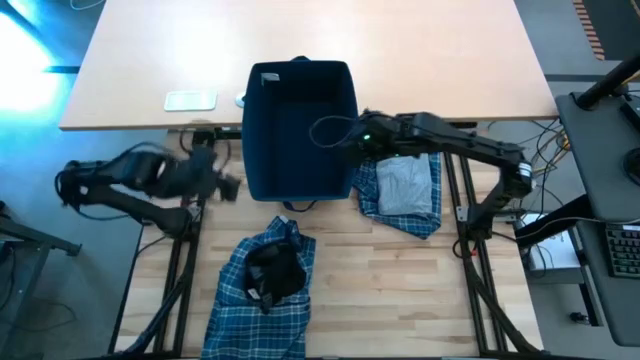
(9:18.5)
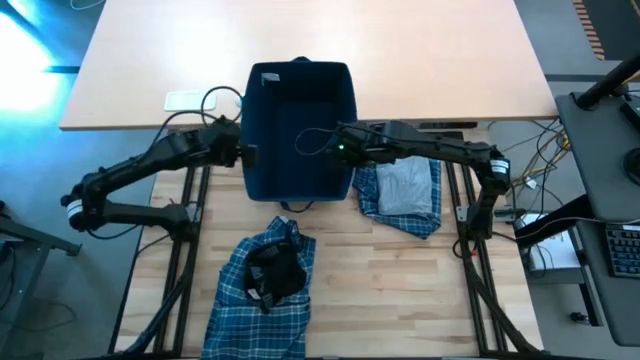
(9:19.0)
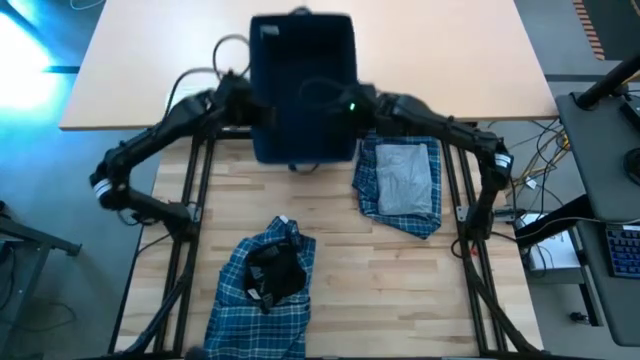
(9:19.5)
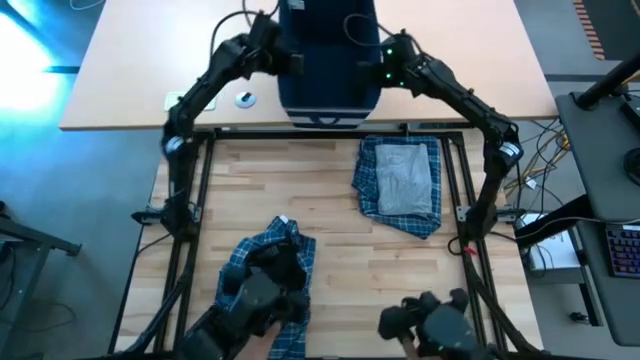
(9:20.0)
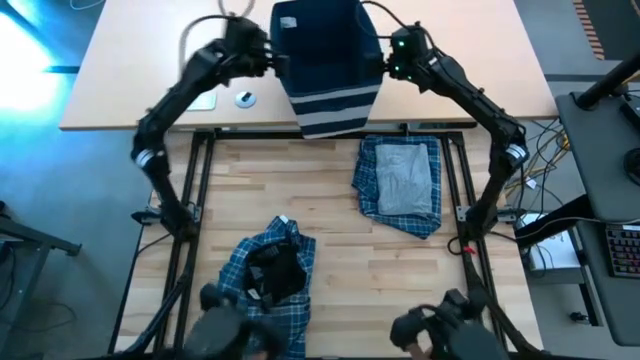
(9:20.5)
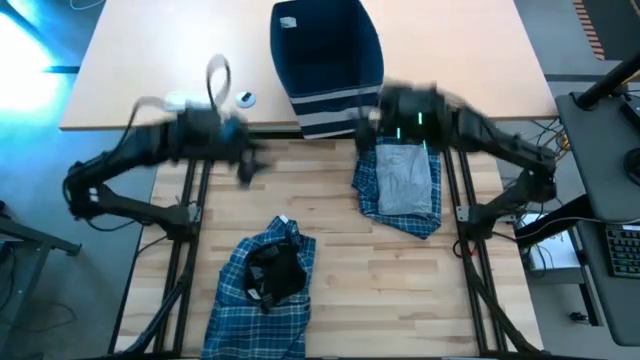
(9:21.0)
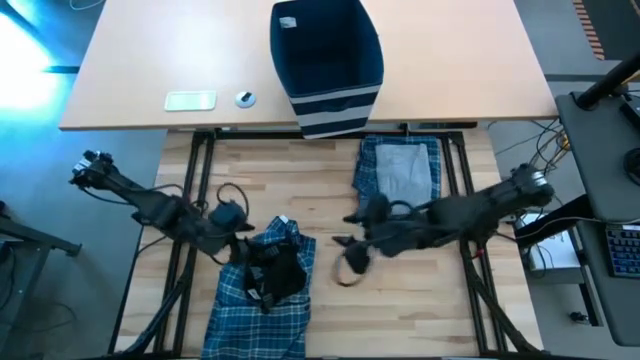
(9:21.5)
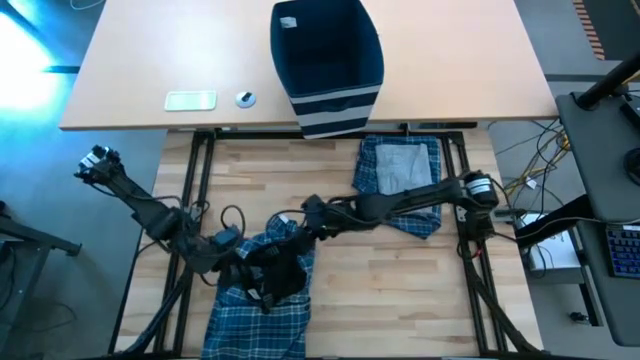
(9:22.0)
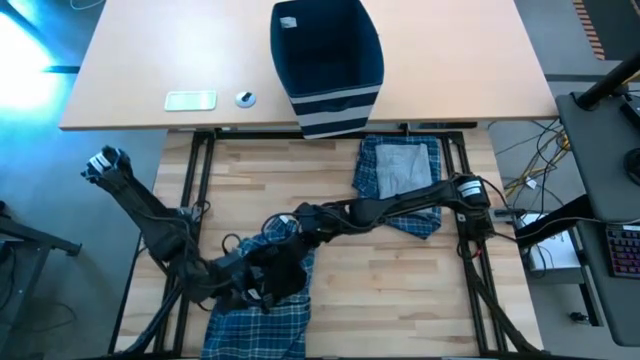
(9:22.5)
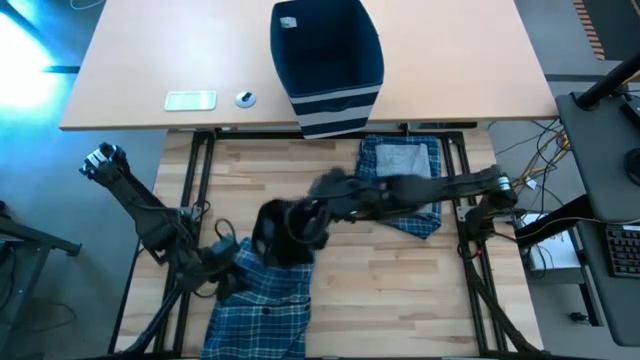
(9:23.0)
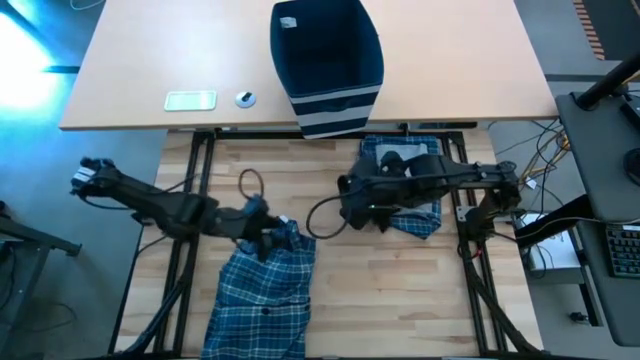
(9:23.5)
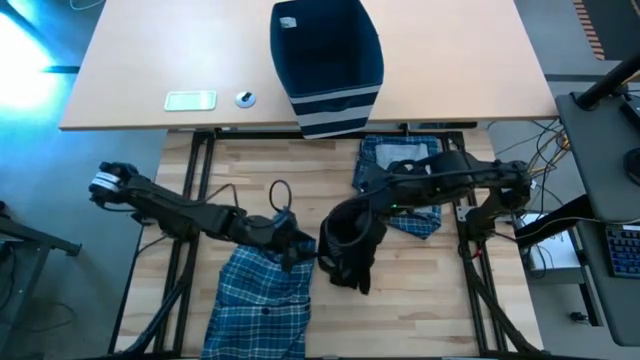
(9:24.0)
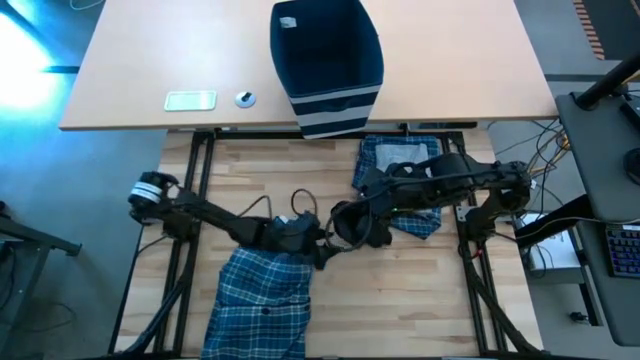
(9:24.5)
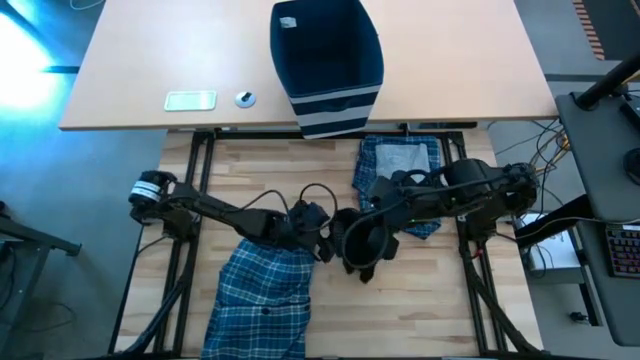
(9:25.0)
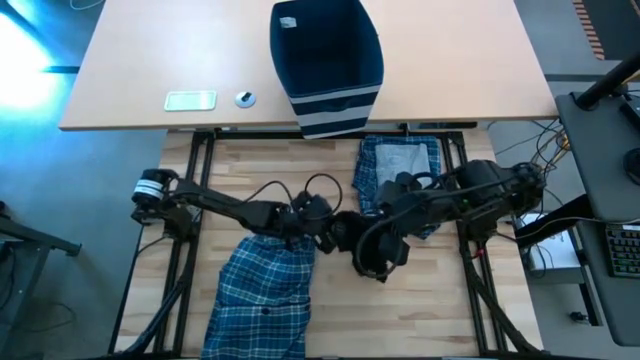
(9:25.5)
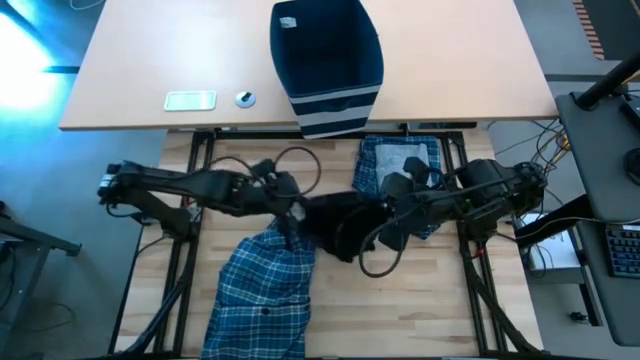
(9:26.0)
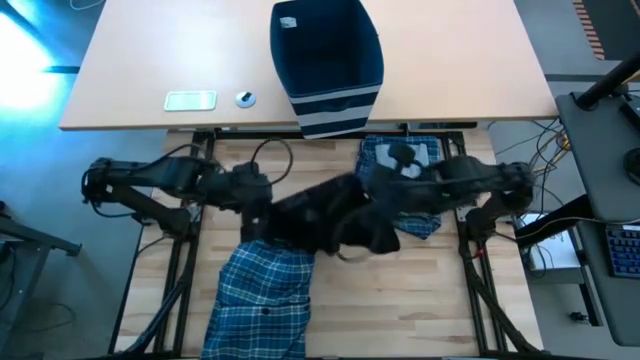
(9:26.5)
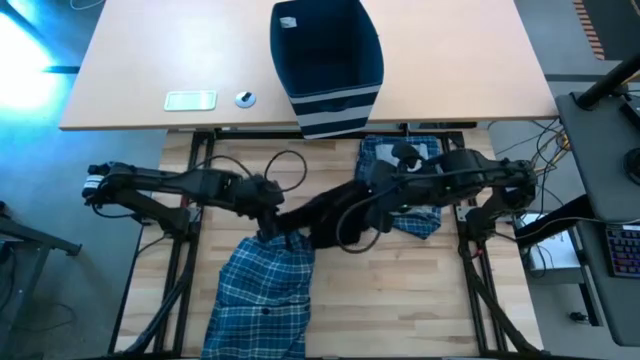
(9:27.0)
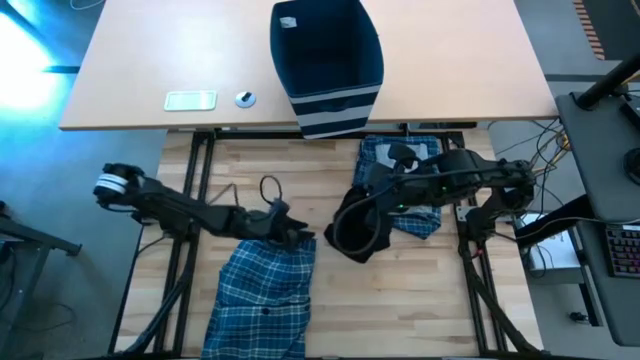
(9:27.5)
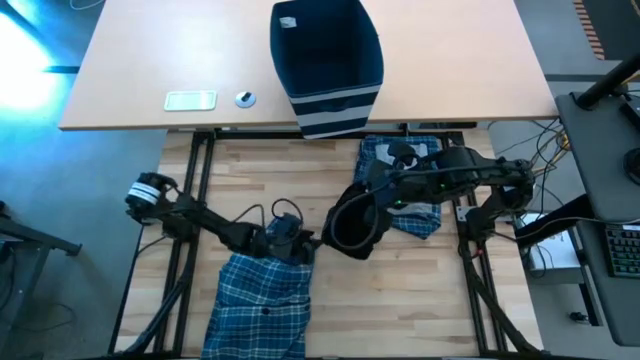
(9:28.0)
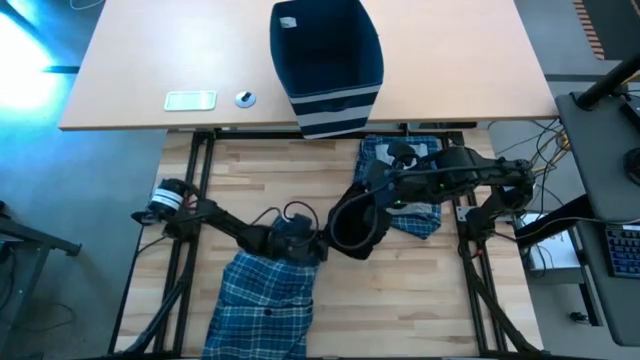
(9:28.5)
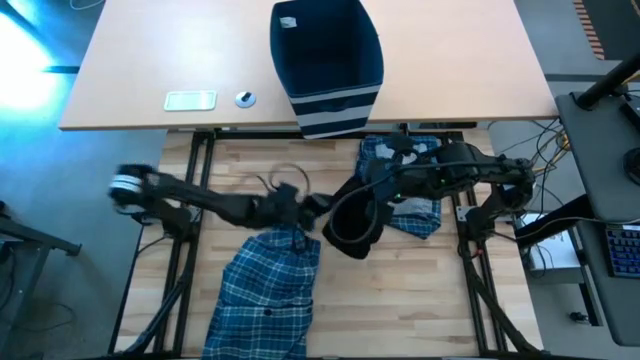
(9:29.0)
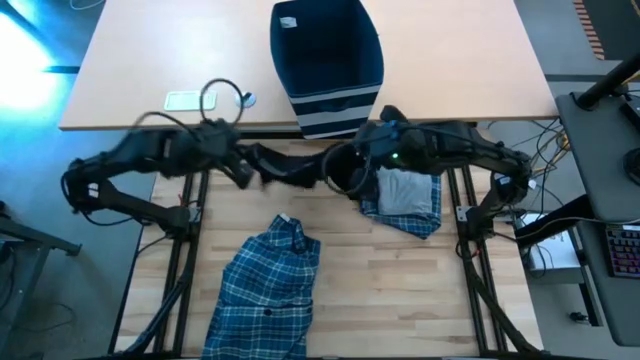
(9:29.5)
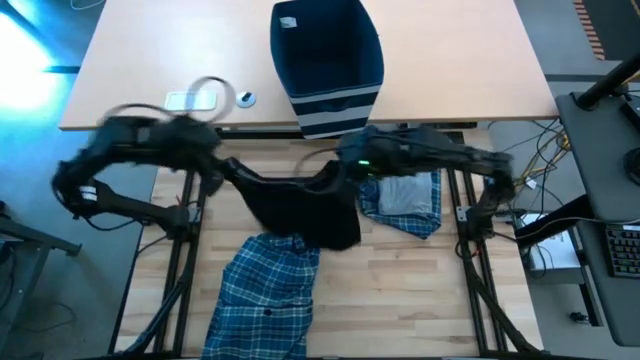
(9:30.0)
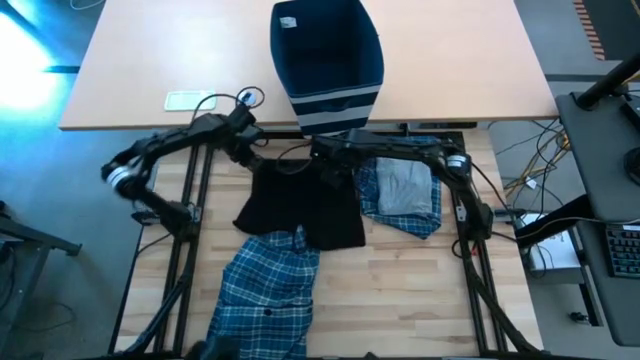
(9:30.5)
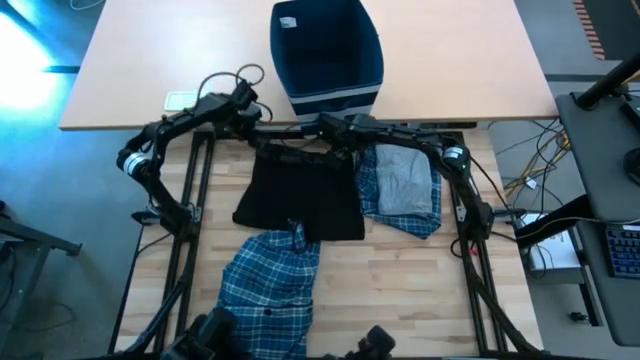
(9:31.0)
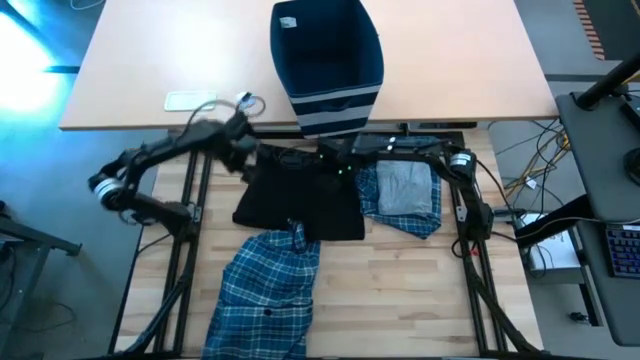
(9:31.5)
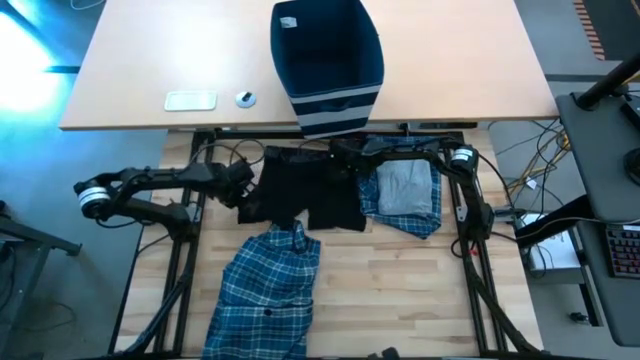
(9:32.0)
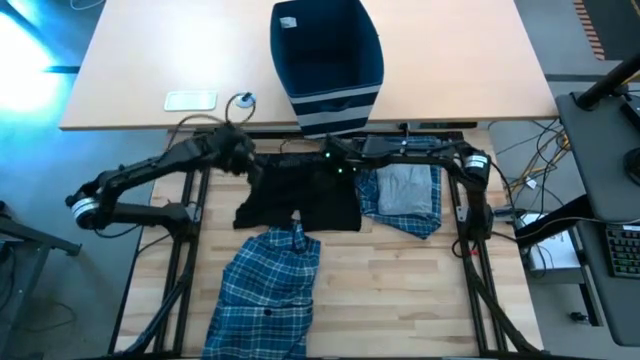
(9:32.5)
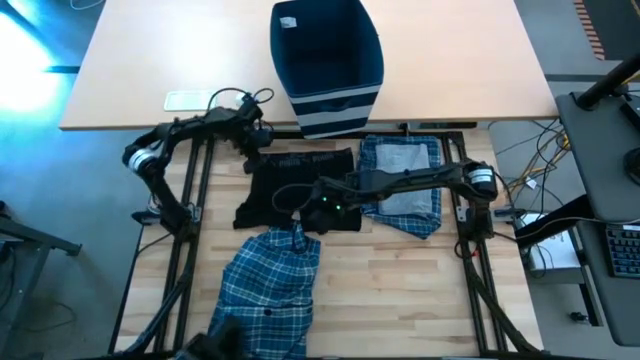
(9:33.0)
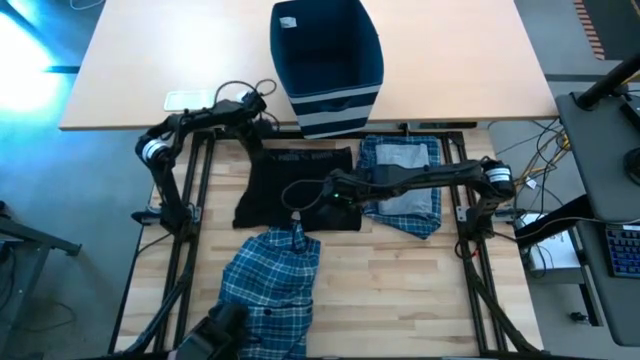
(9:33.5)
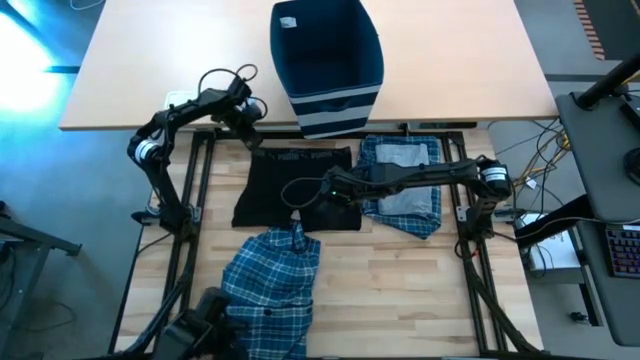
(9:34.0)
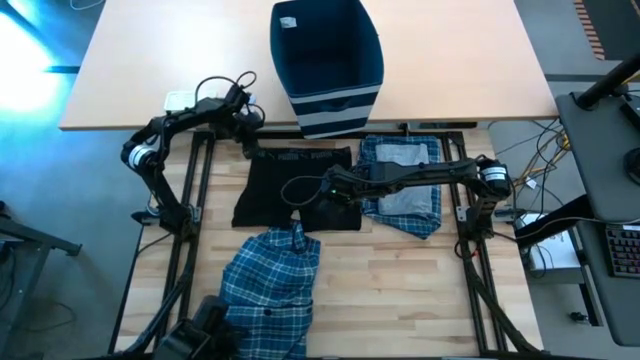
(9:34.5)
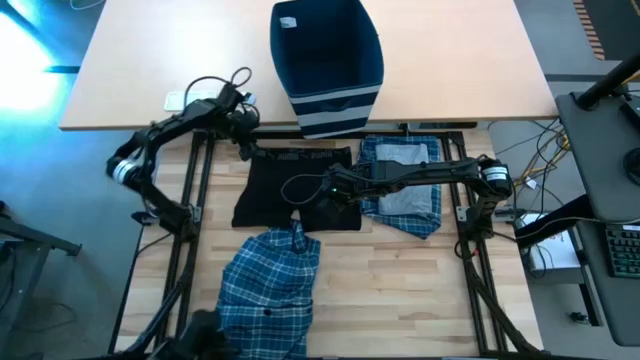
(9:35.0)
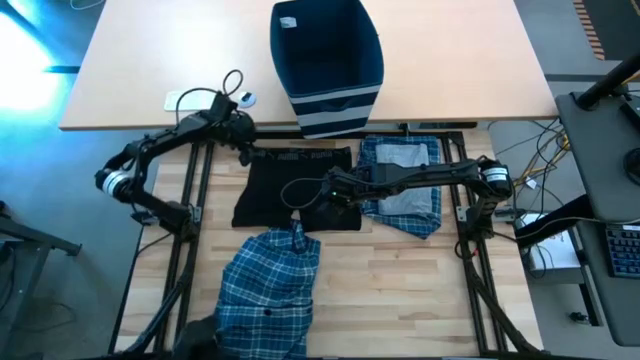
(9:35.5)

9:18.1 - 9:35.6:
Task: Fold Laundry from Bin
Fold the black boxer short

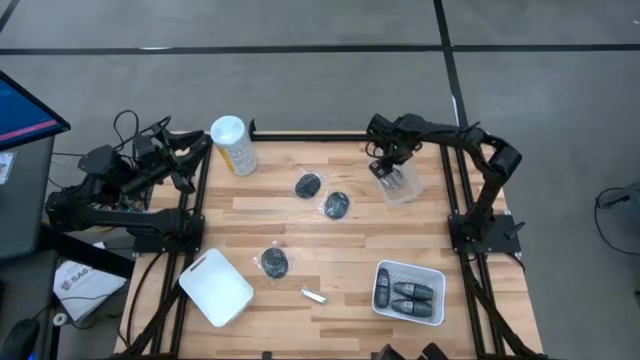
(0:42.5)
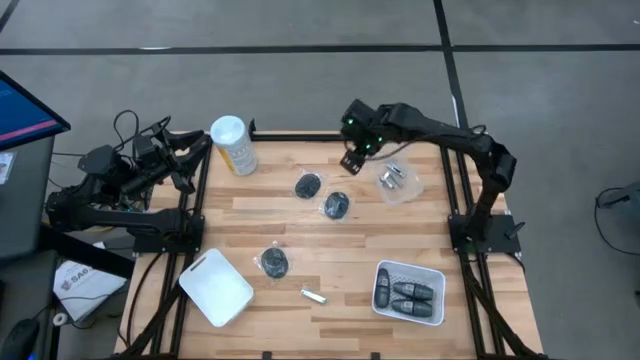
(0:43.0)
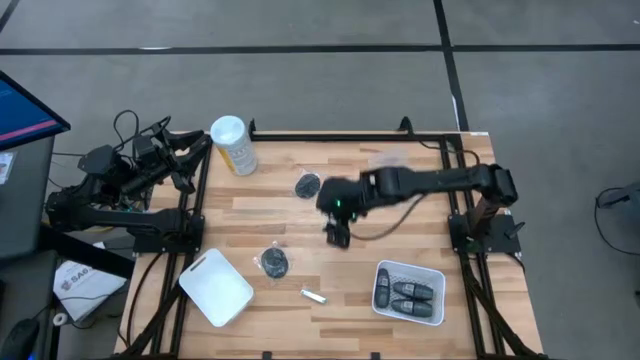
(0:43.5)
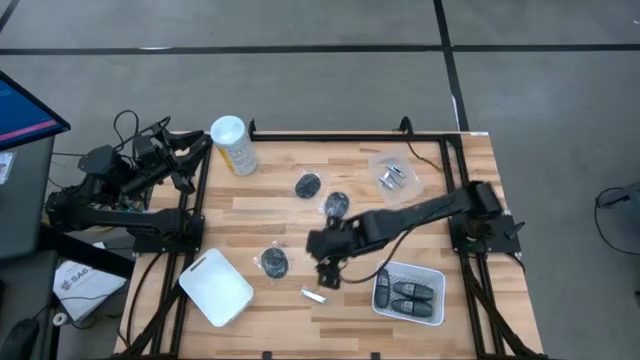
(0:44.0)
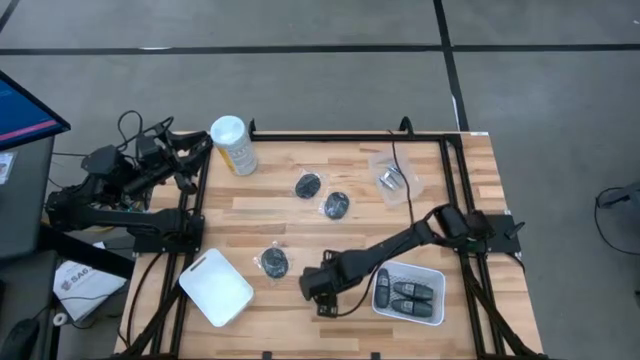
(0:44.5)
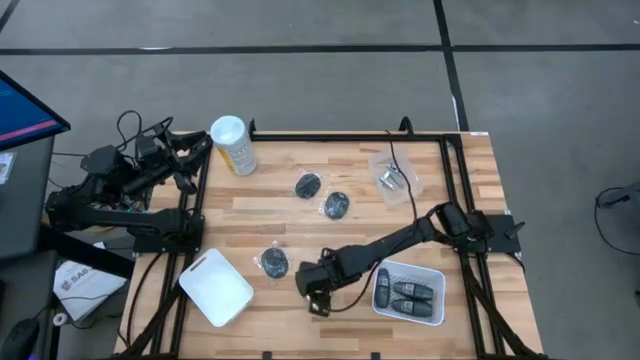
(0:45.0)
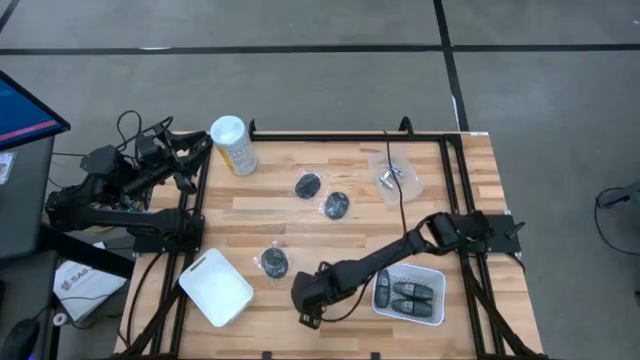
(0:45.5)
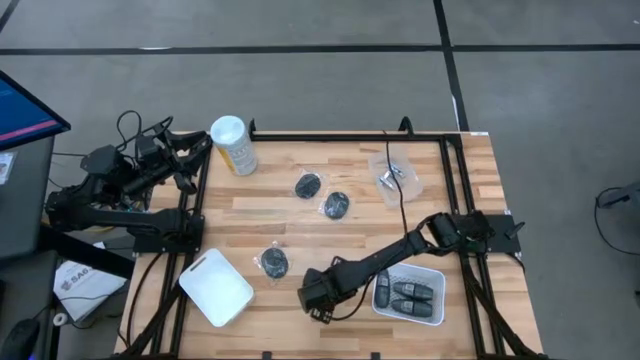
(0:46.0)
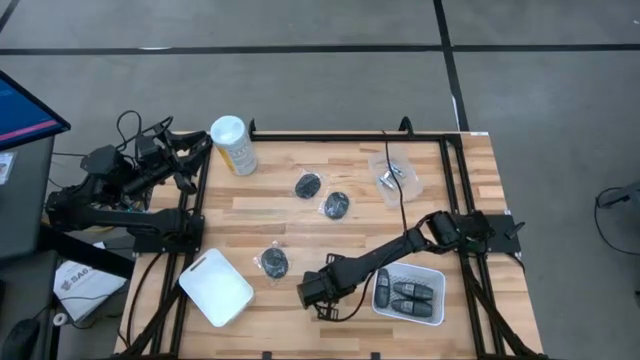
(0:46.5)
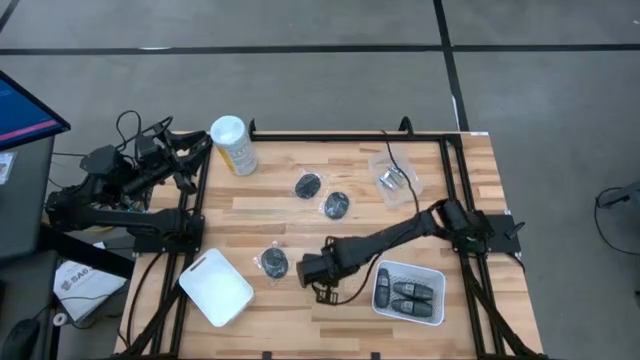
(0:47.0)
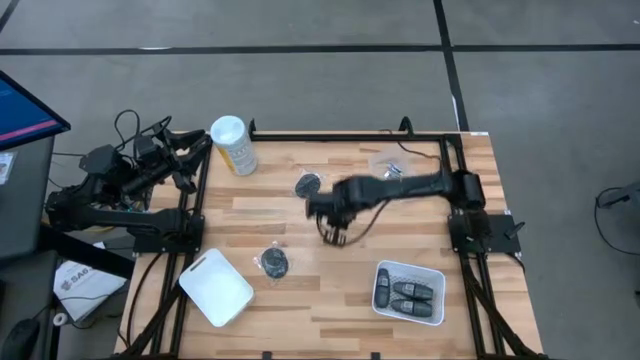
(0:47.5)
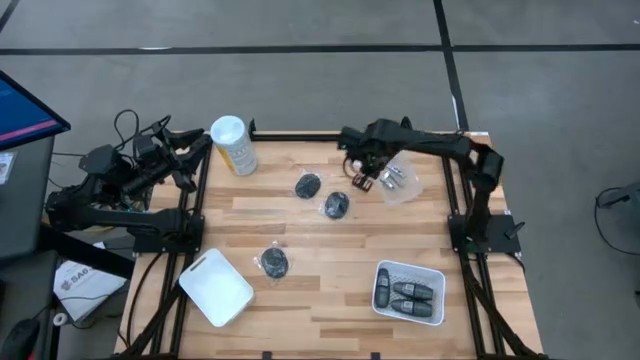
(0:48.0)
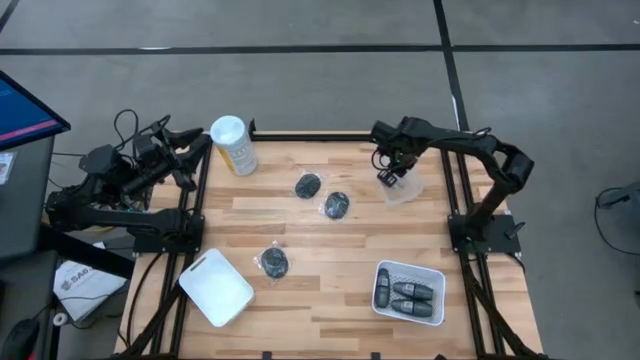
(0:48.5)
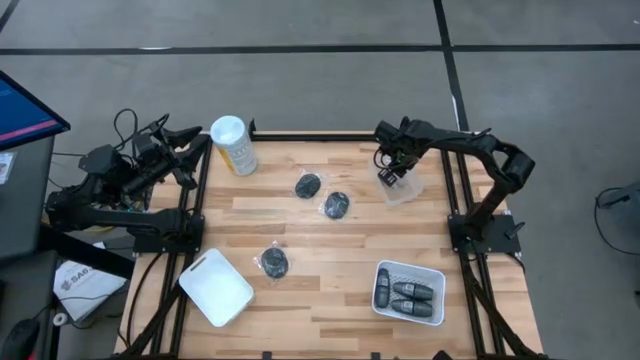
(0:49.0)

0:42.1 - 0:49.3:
Task: Pick & Place Travel size toiletries
Put the silver nail cutter into the transparent bin
